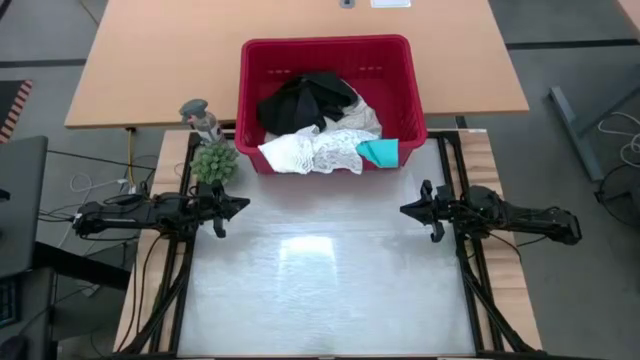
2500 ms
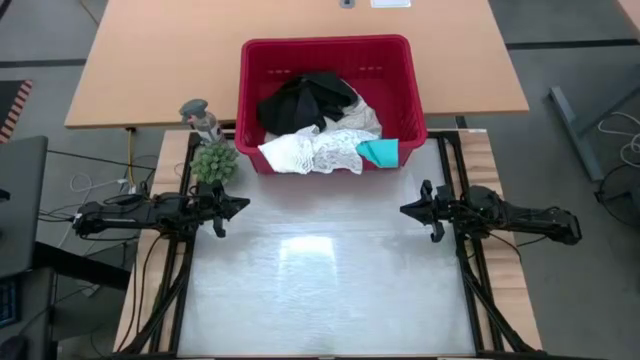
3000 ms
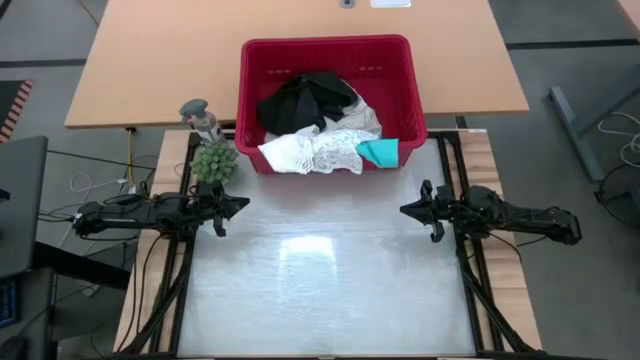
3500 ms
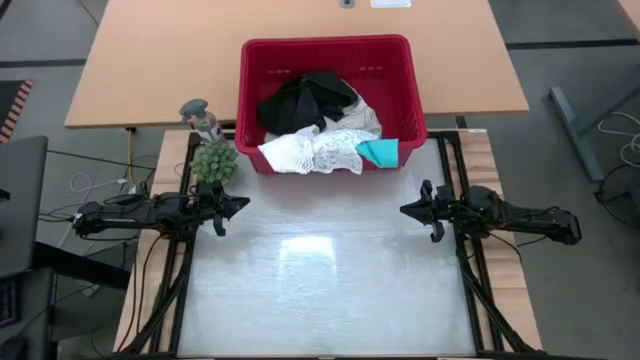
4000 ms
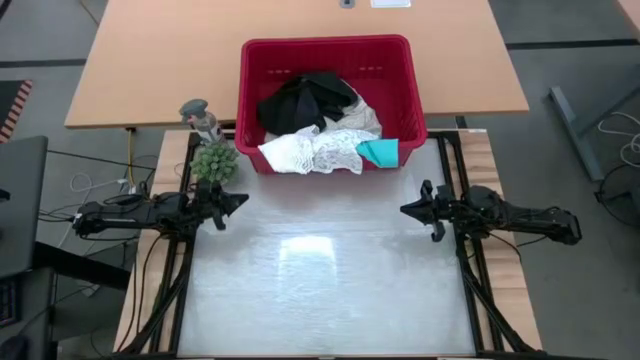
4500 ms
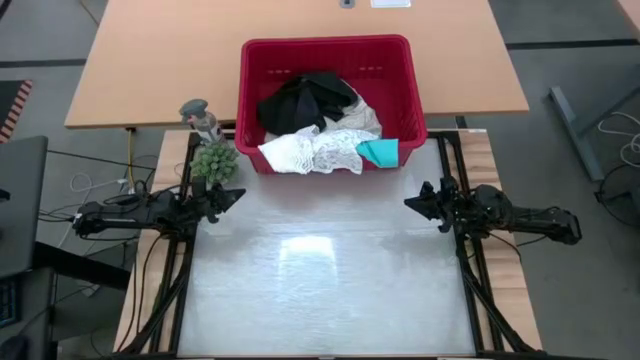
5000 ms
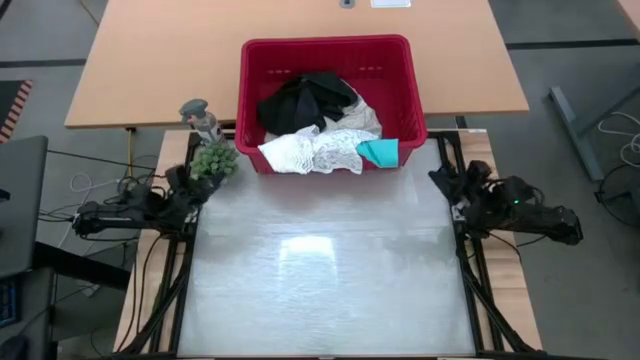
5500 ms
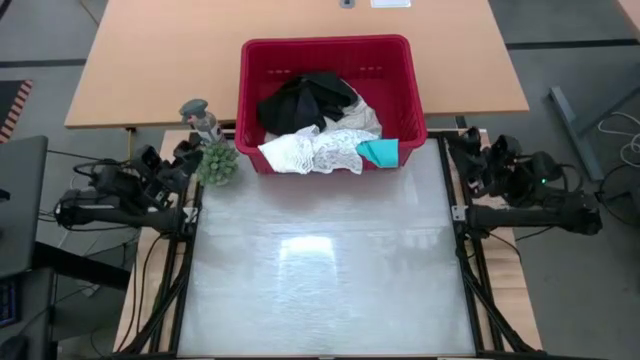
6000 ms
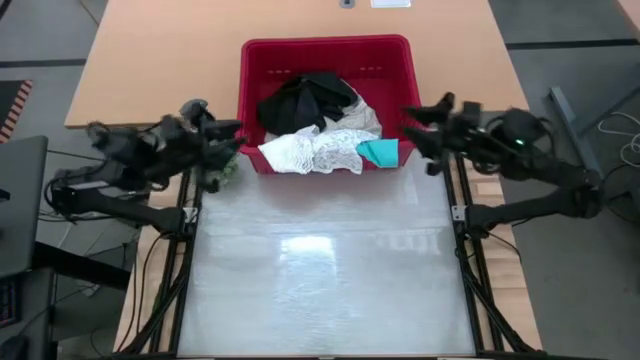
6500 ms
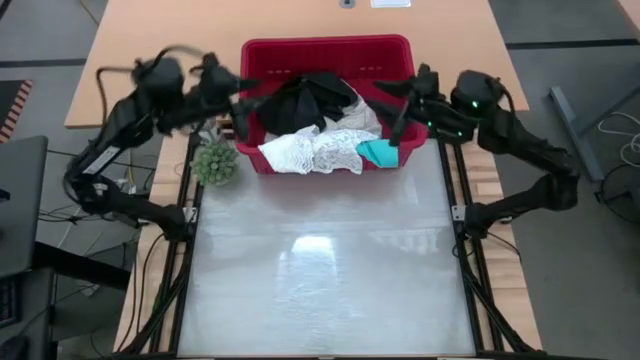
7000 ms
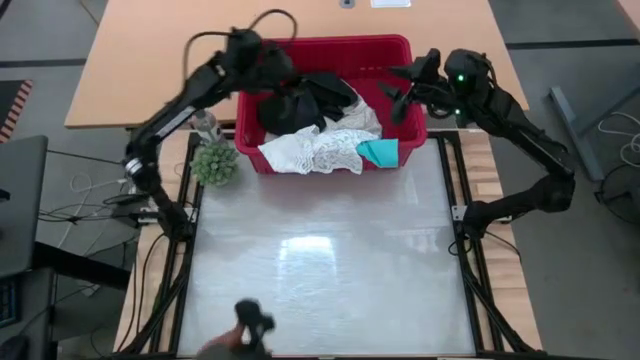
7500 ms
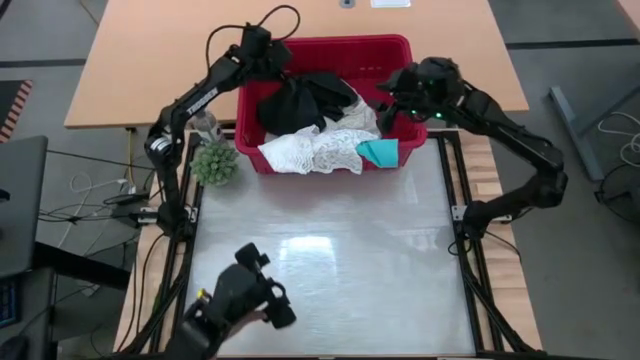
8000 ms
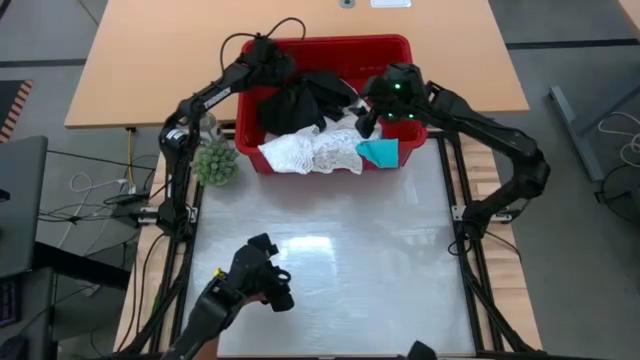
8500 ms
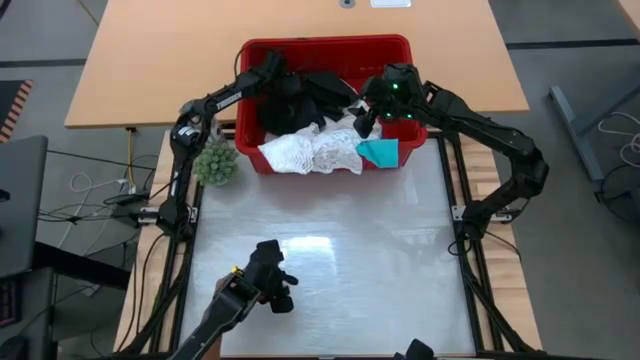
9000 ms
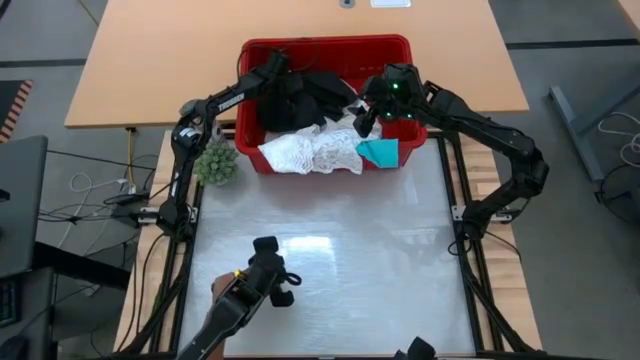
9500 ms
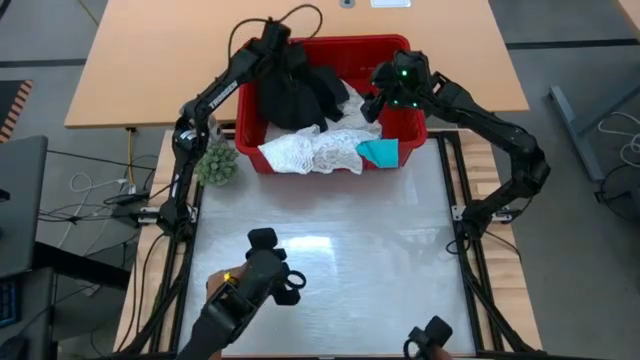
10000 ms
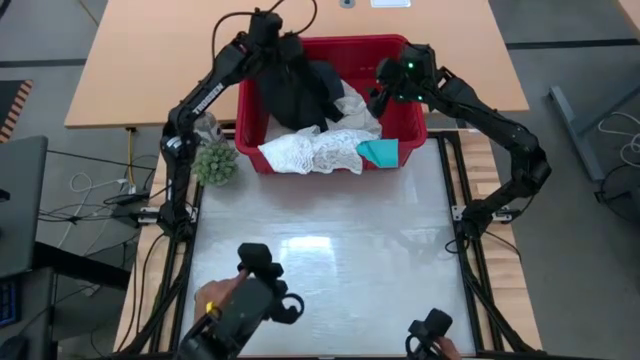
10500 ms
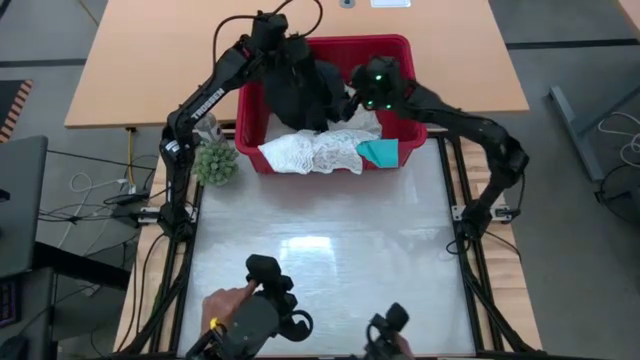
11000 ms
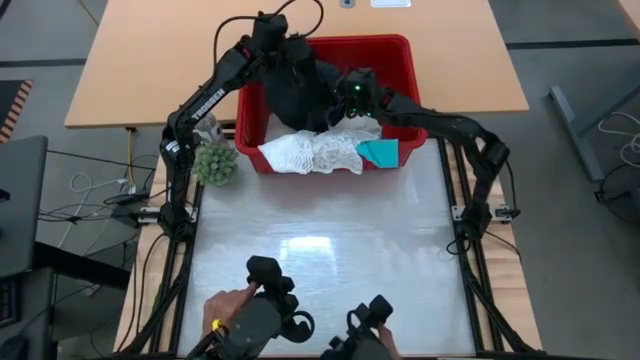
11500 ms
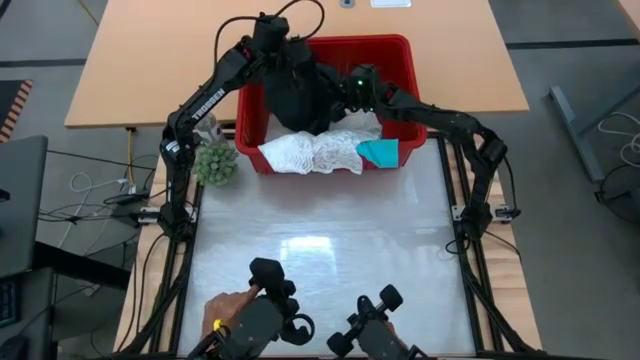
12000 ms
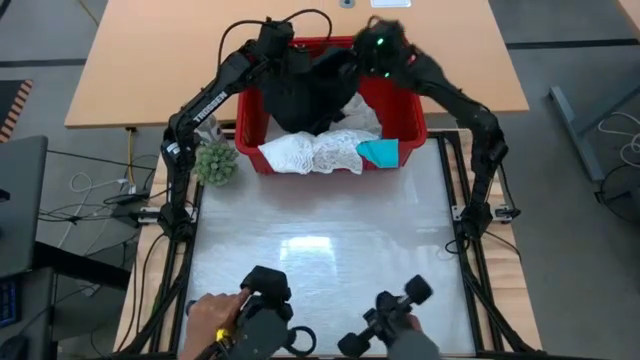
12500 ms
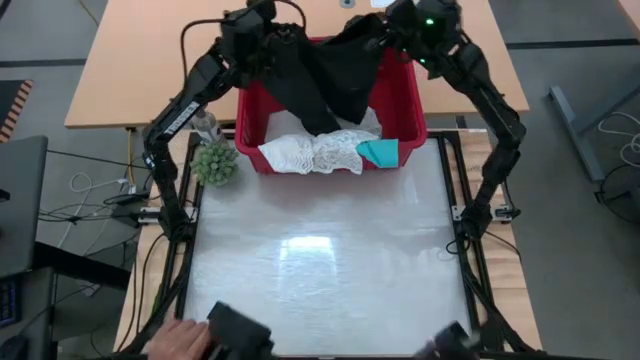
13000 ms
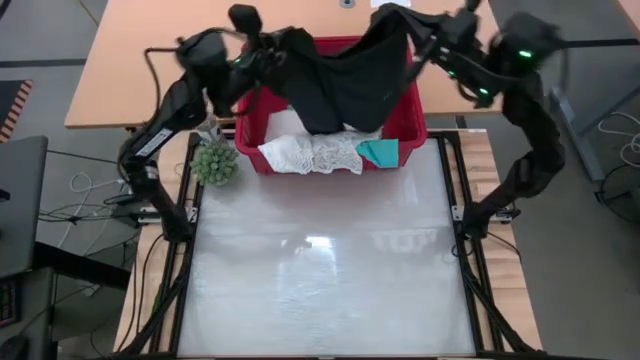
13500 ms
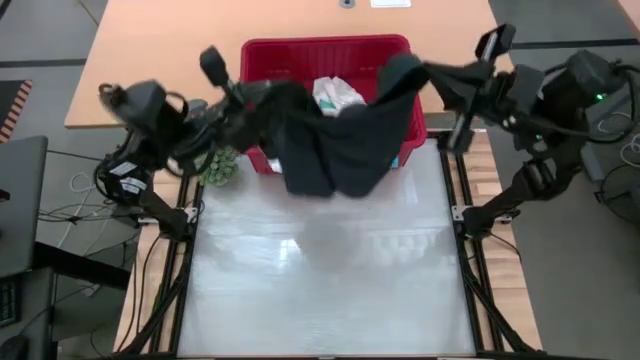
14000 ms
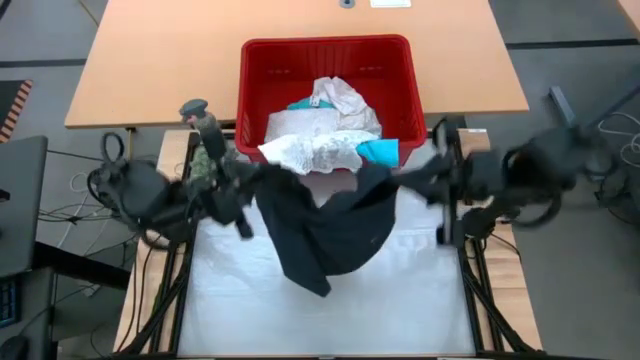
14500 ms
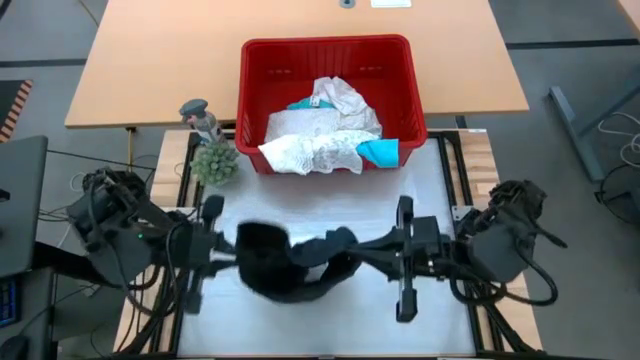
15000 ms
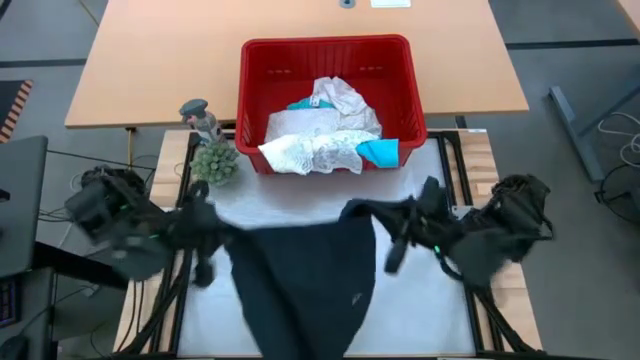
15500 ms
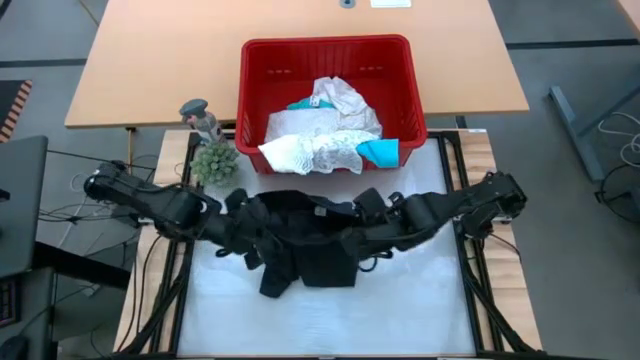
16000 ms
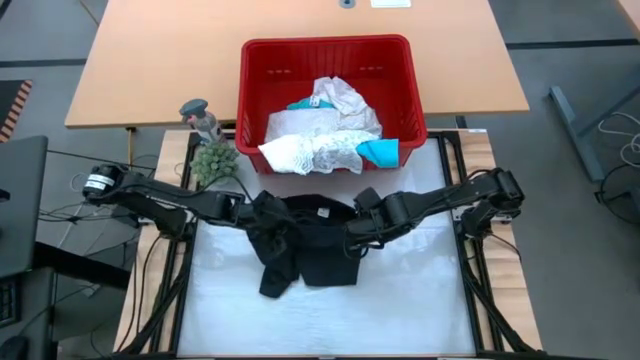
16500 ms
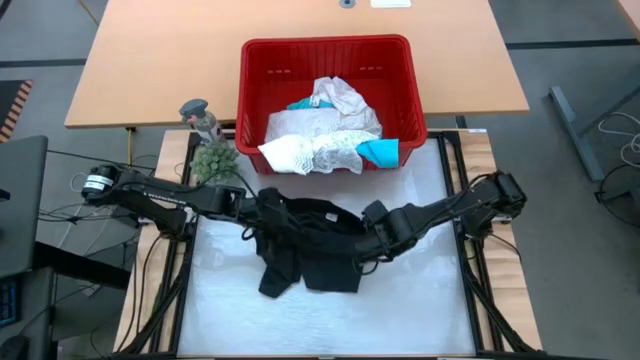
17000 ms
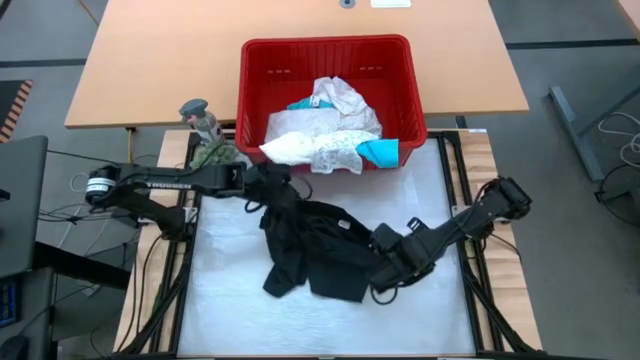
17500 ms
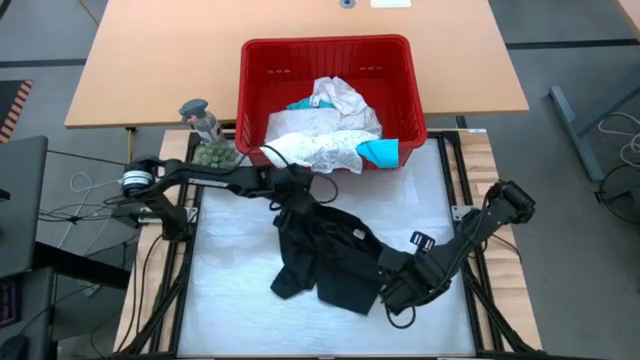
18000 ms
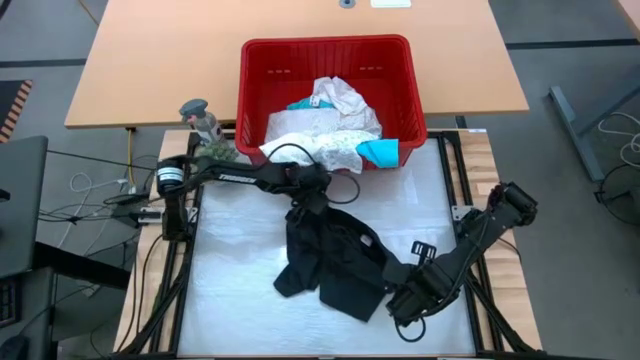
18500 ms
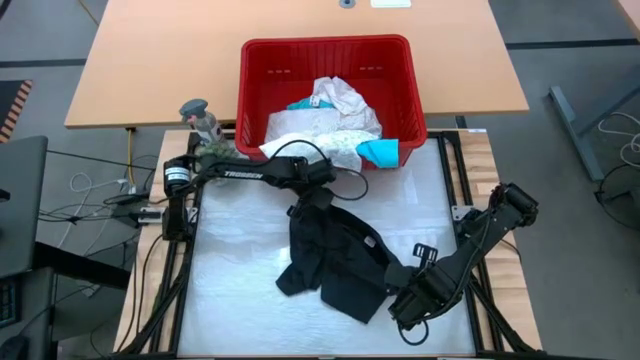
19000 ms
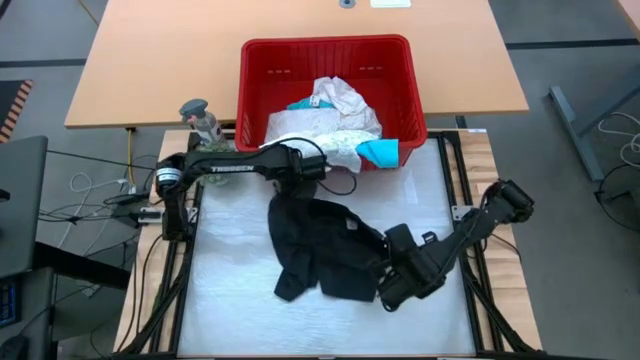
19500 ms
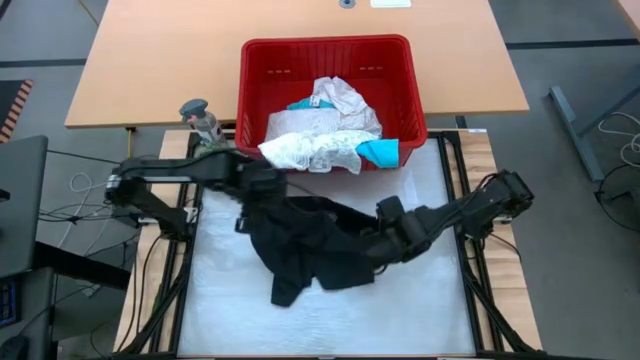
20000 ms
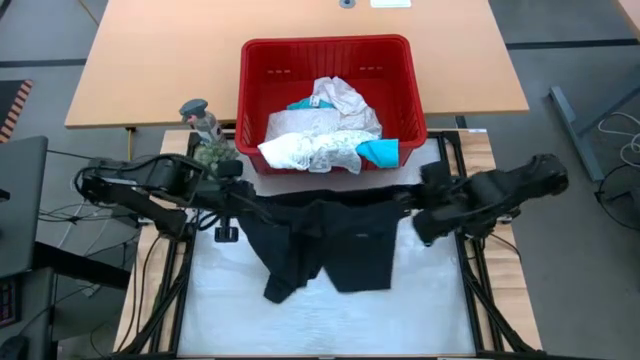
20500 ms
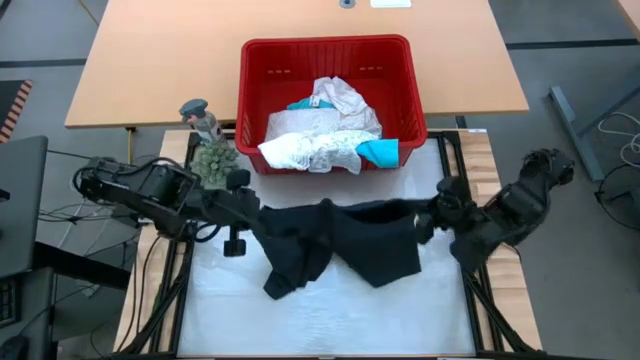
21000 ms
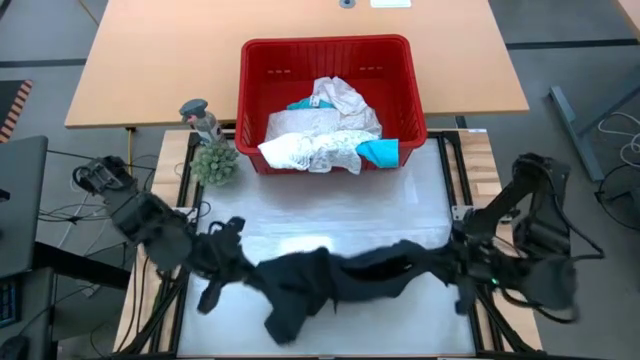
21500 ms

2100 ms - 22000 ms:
Task: Fold Laundry from Bin
Fold the black shorts
